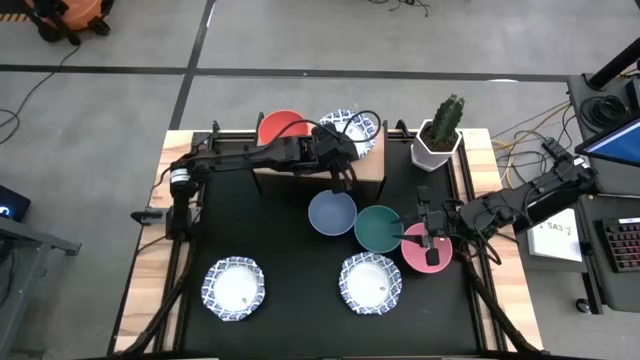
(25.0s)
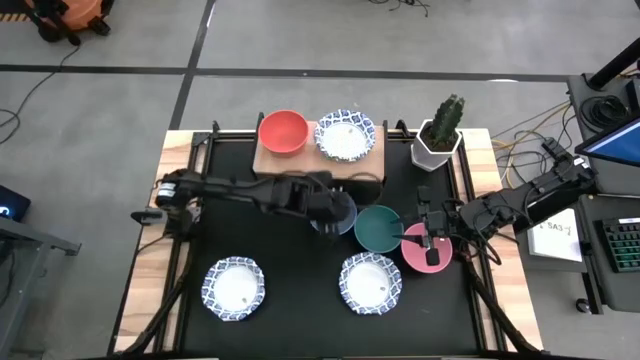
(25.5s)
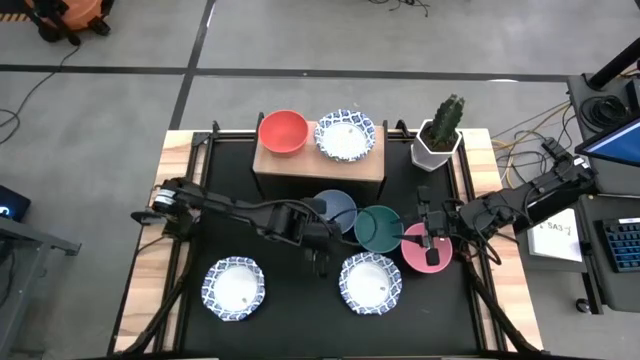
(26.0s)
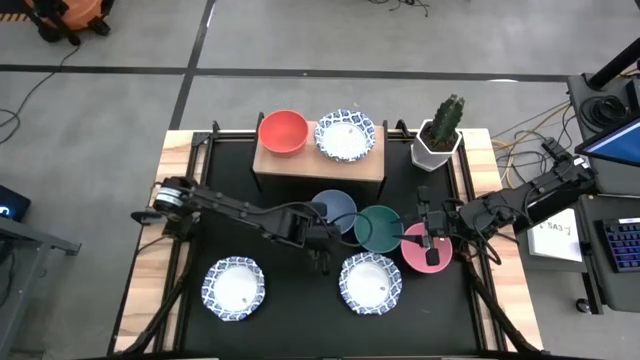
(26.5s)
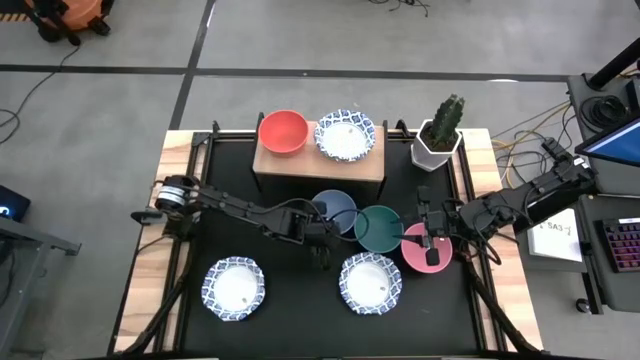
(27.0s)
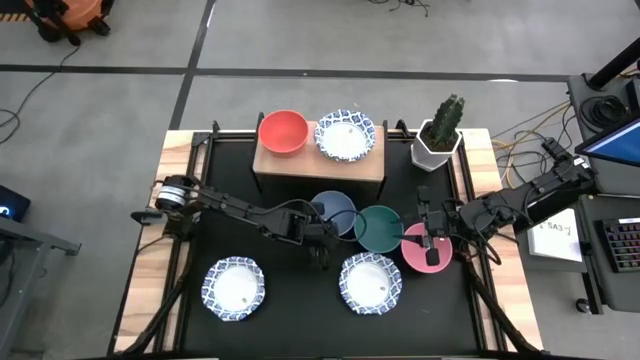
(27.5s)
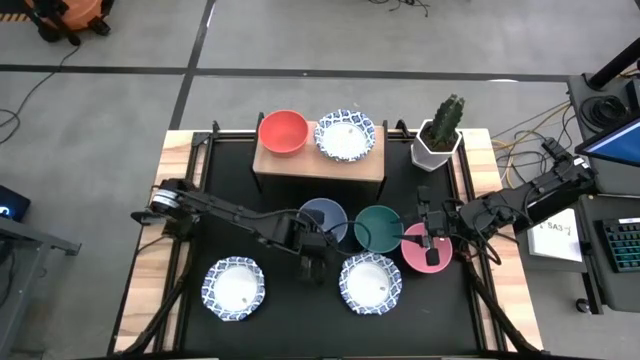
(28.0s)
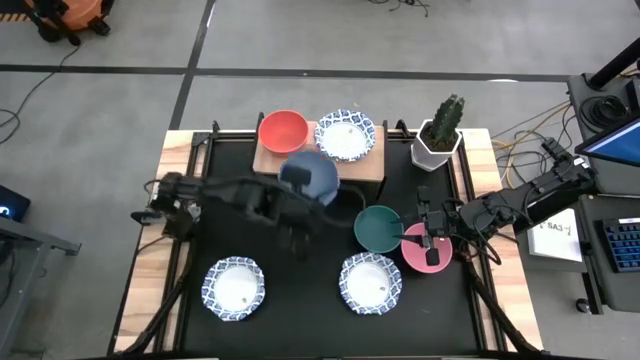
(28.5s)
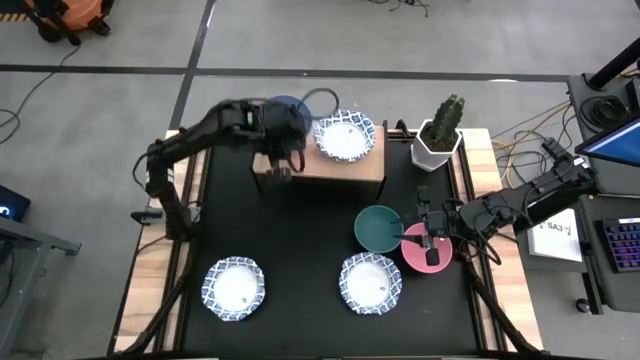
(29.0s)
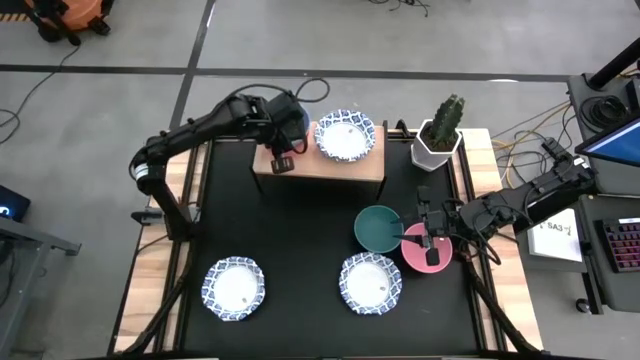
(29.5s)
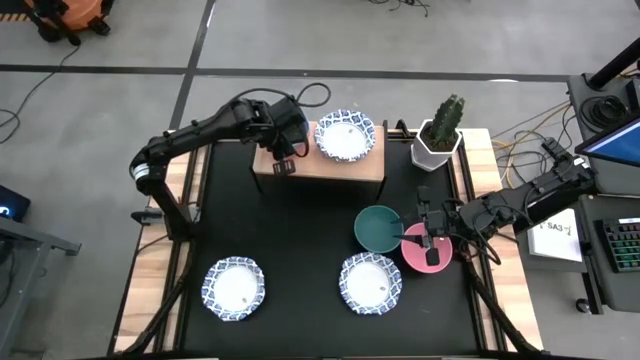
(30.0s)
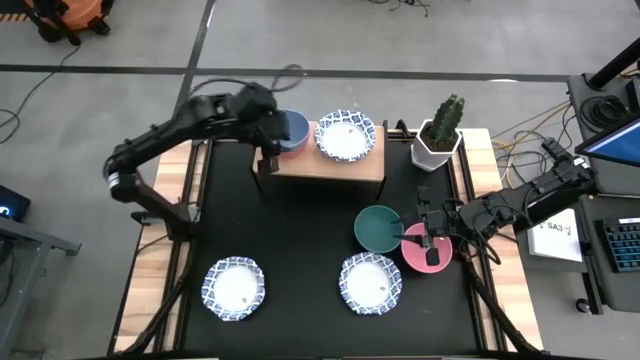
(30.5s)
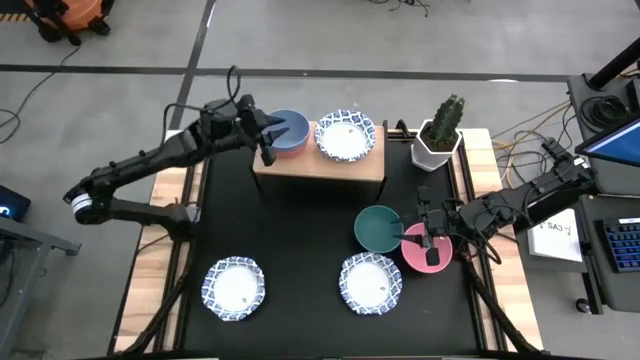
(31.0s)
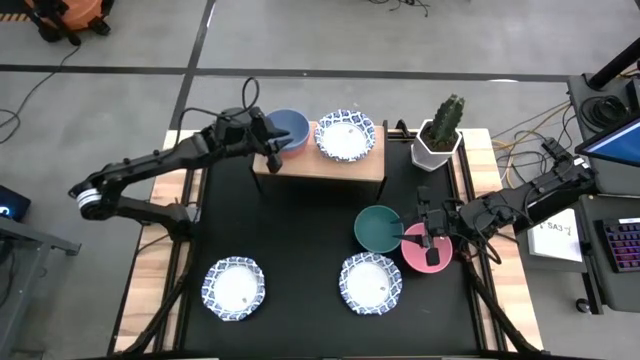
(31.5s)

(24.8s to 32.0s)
Task: Place and stack bowls onto a shelf
Stack the blue bowl on top of the orange bowl on the shelf

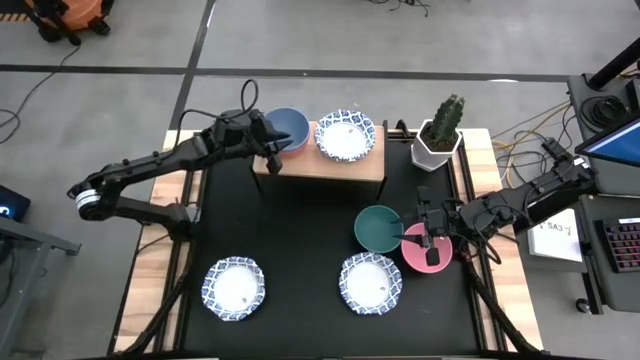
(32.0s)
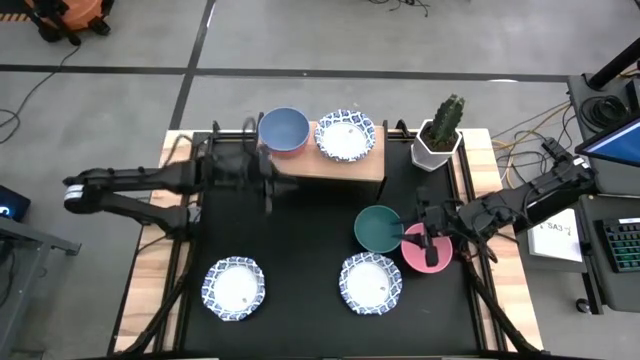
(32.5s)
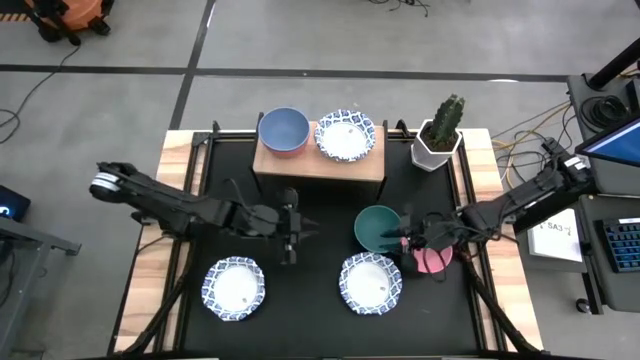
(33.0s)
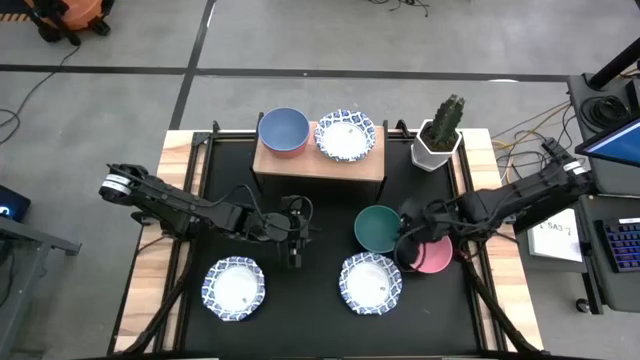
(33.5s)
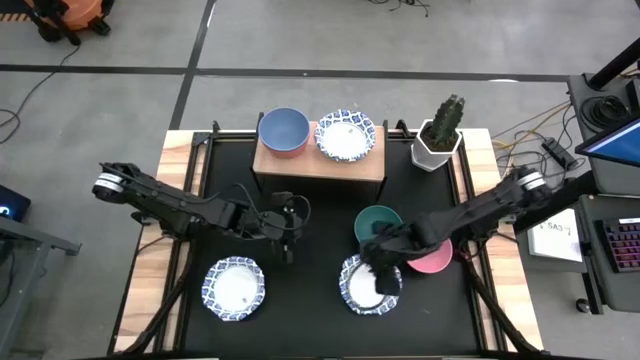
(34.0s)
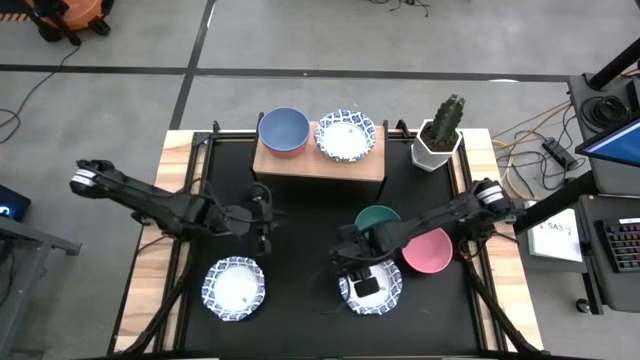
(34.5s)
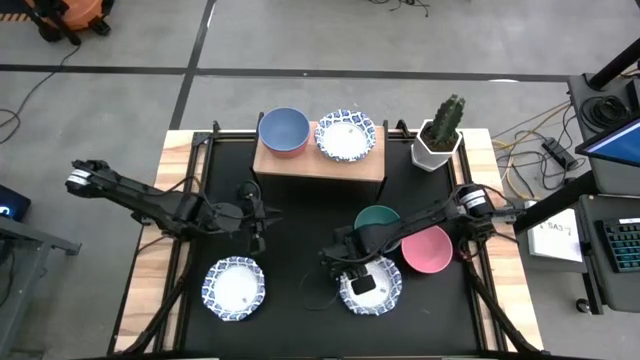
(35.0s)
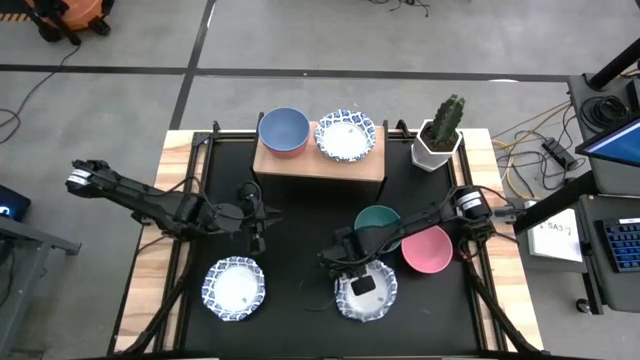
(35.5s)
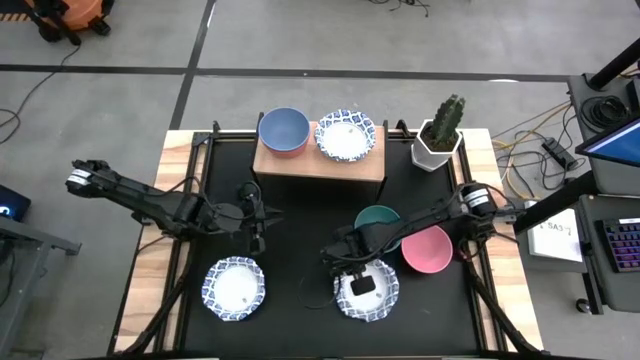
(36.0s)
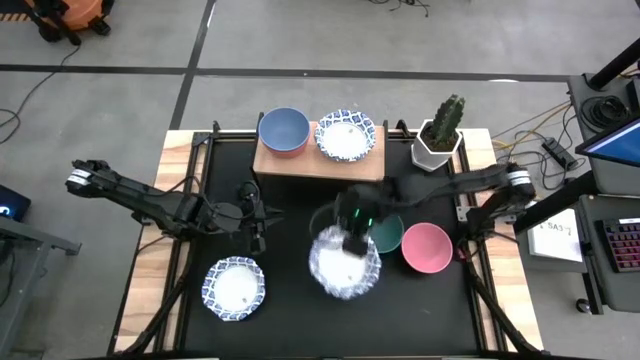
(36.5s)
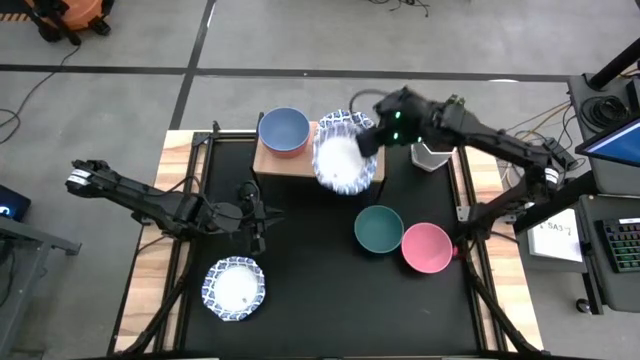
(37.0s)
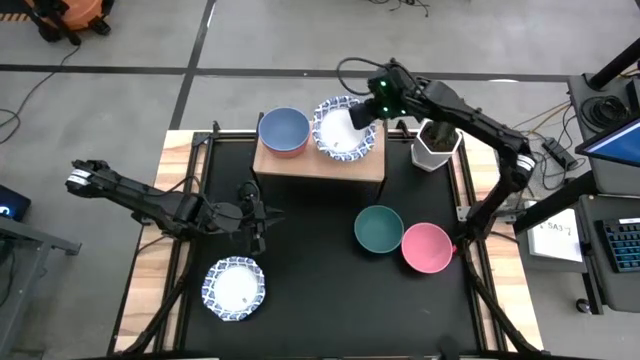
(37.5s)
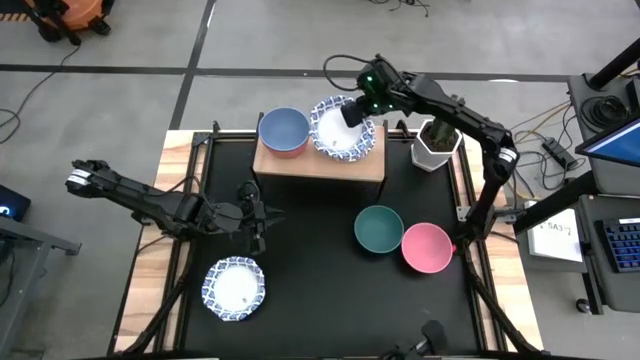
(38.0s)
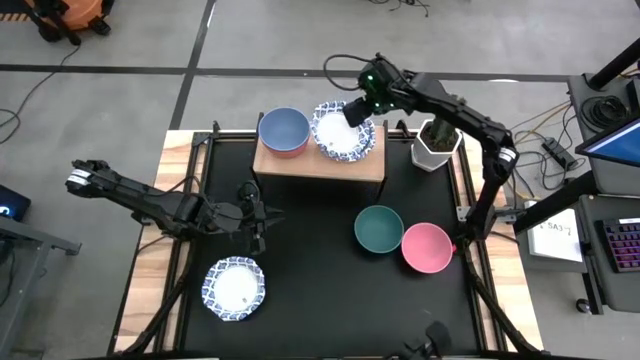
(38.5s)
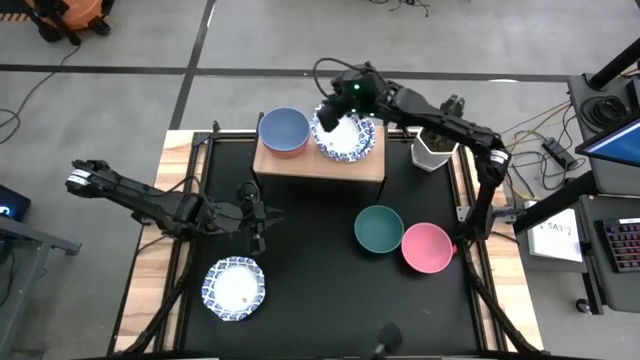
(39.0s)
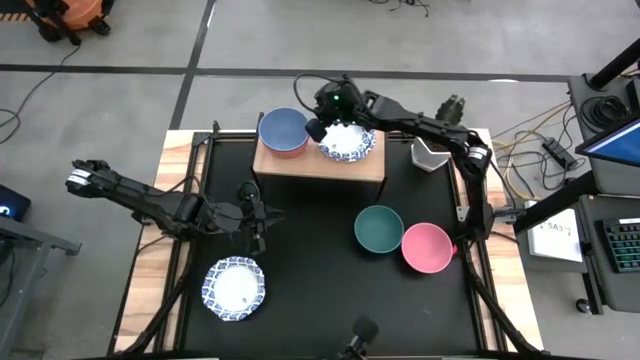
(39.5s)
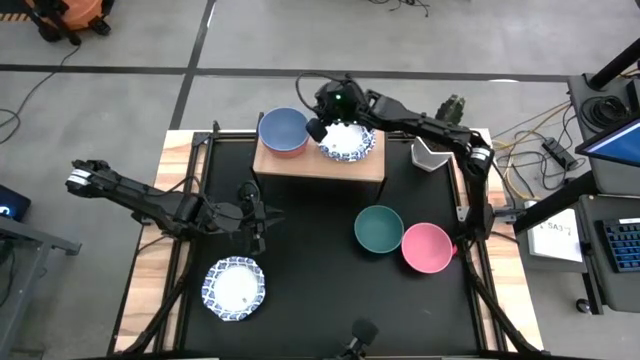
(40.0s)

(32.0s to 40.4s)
Stack the white bowl on top of the white bowl on the shelf

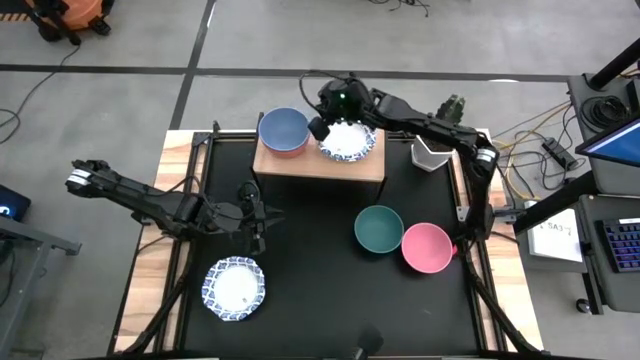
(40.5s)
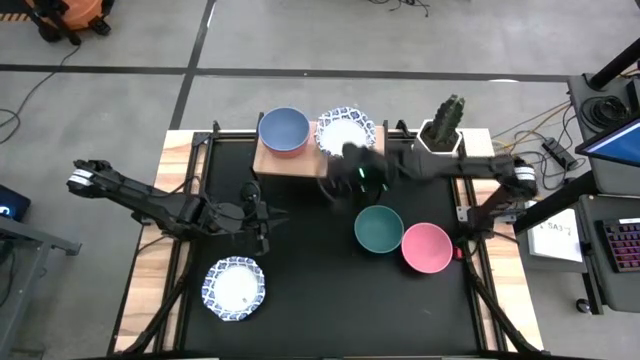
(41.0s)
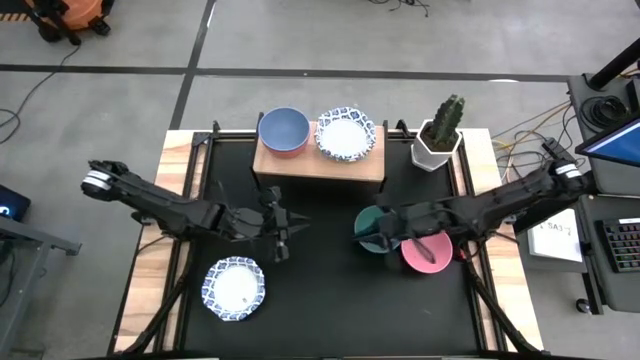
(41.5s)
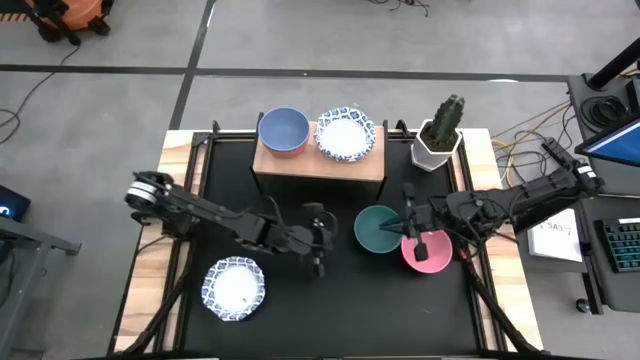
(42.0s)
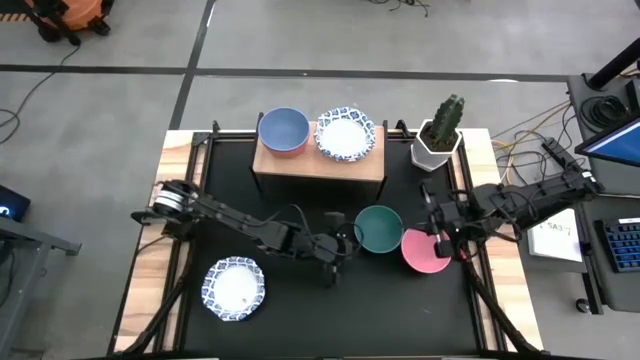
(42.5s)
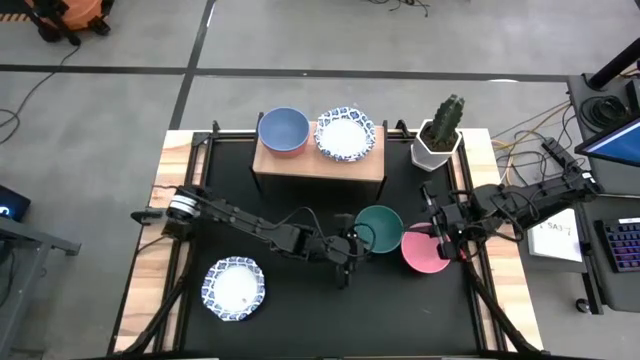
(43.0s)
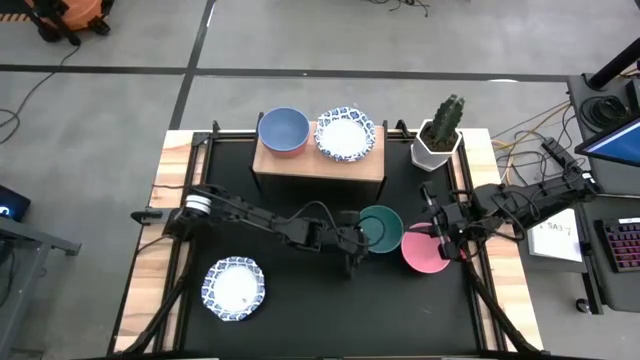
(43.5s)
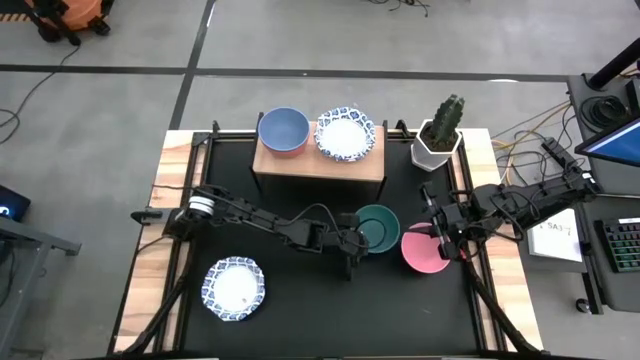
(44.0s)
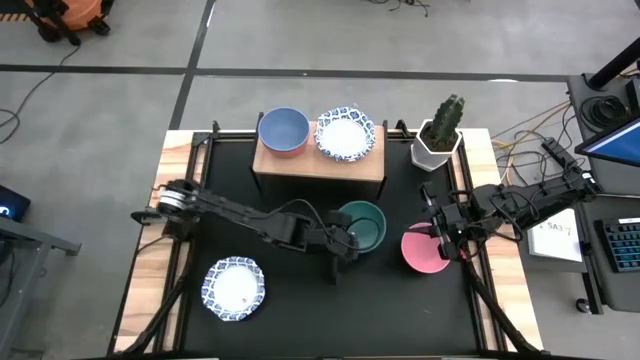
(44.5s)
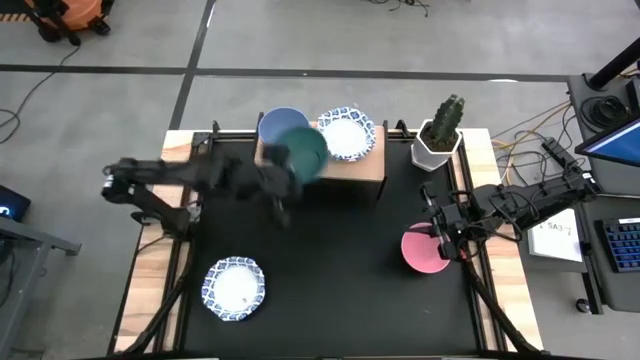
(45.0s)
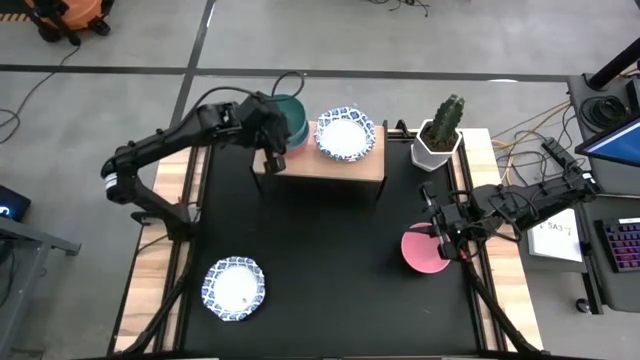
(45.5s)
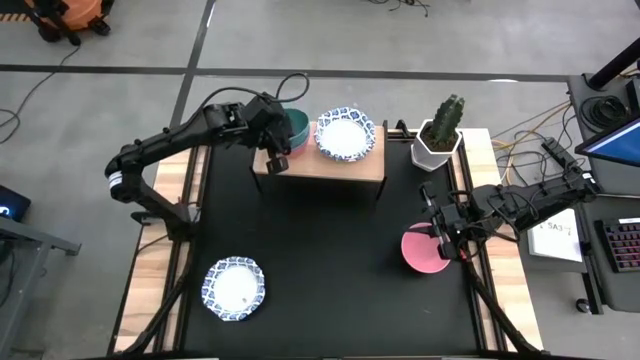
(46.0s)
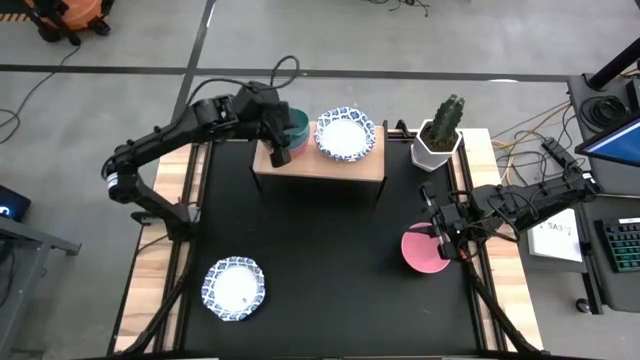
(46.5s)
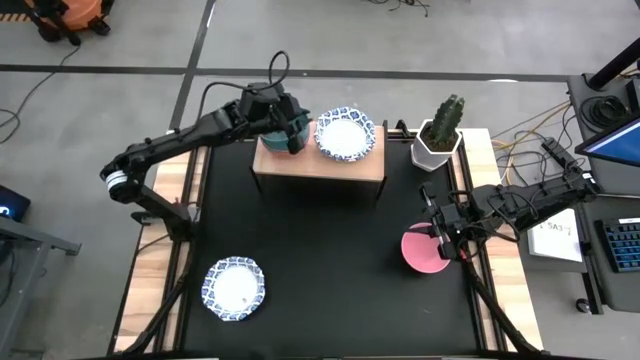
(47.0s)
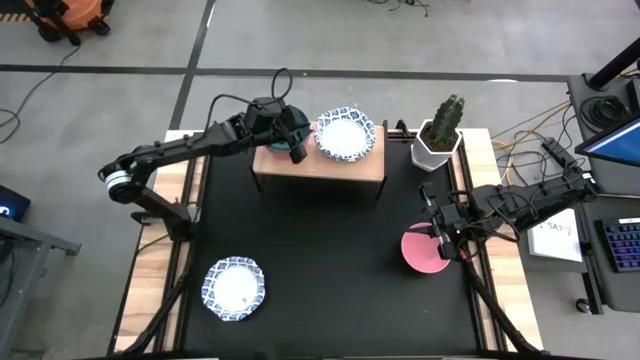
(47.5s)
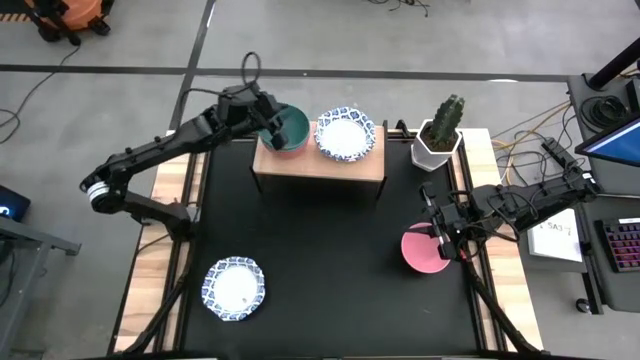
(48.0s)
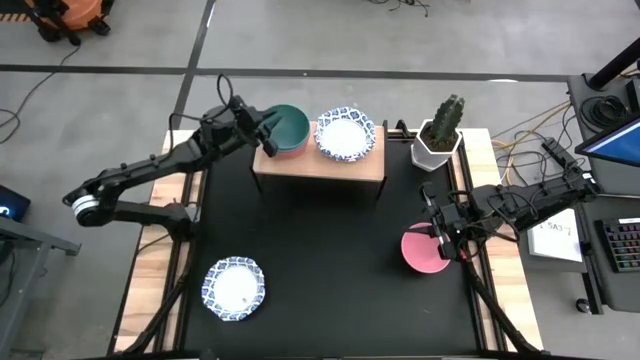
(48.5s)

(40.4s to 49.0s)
Stack the green bowl on top of the blue bowl on the shelf
